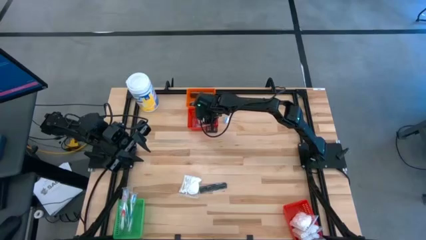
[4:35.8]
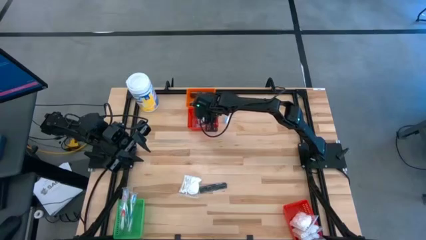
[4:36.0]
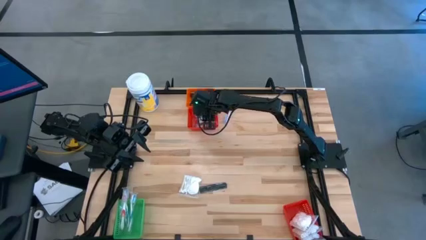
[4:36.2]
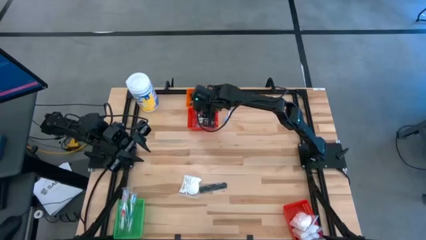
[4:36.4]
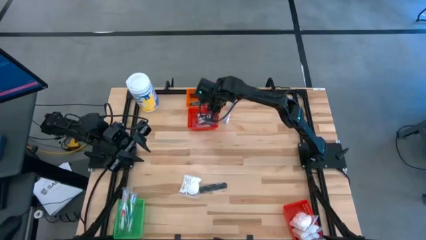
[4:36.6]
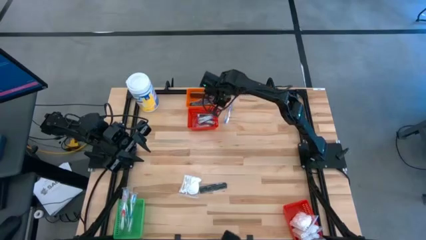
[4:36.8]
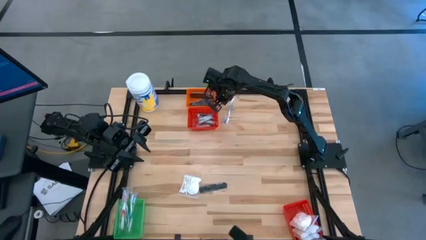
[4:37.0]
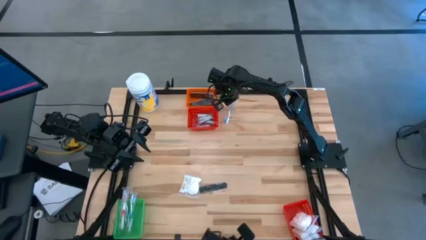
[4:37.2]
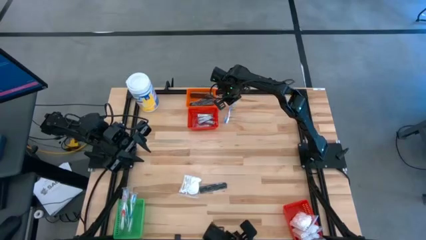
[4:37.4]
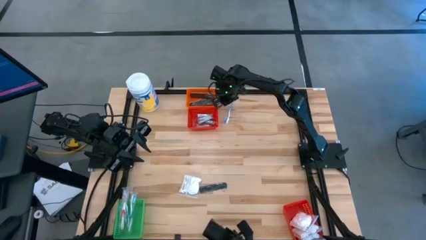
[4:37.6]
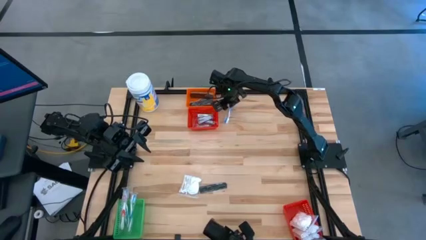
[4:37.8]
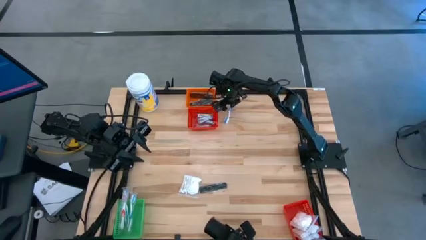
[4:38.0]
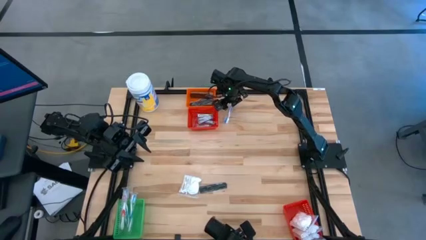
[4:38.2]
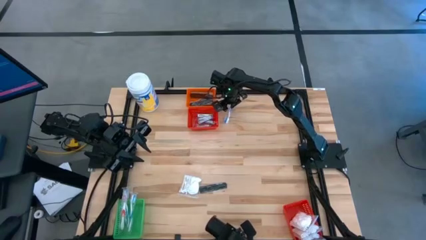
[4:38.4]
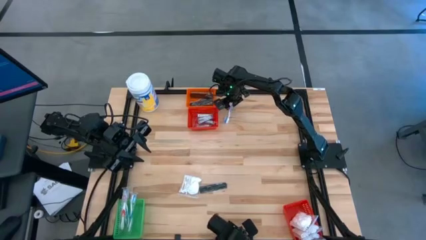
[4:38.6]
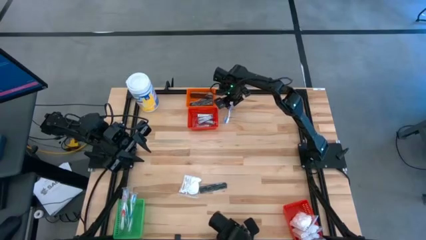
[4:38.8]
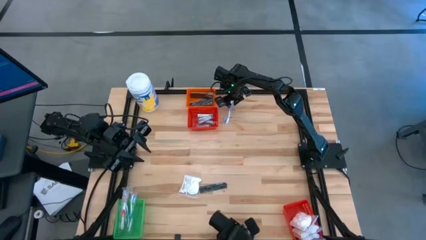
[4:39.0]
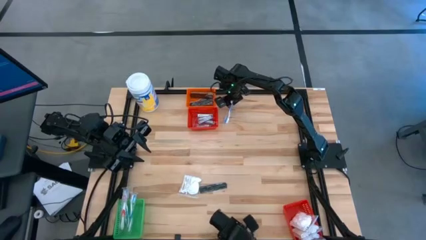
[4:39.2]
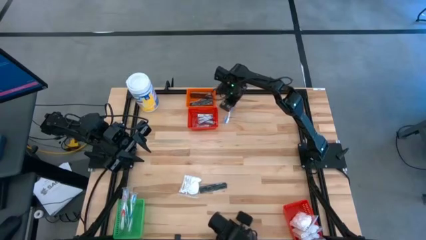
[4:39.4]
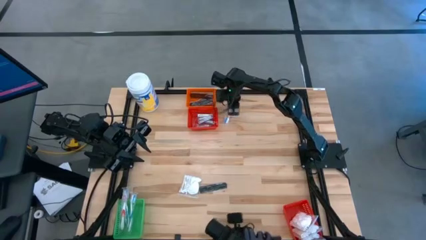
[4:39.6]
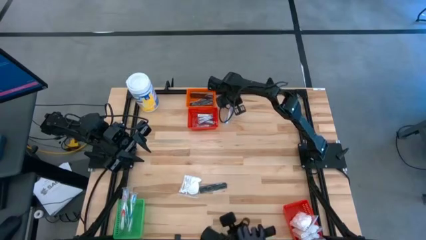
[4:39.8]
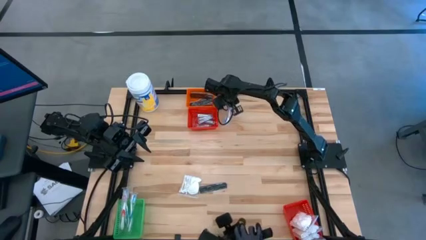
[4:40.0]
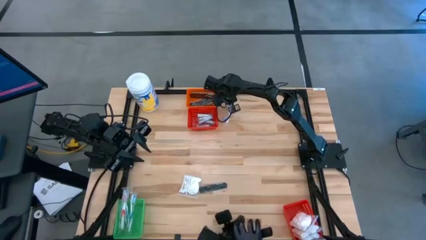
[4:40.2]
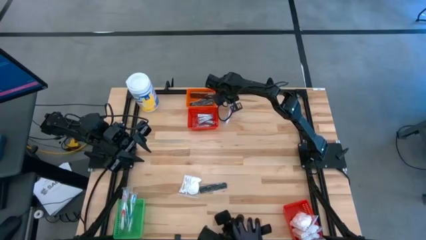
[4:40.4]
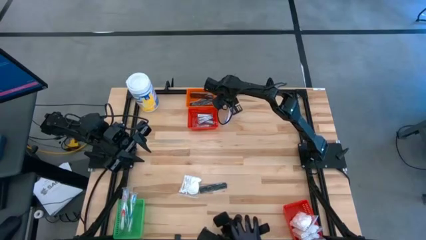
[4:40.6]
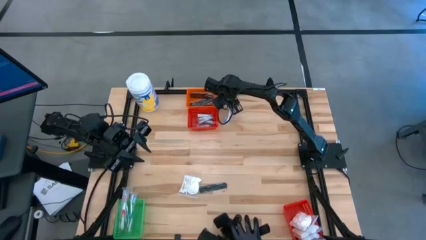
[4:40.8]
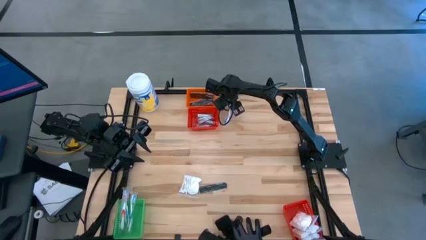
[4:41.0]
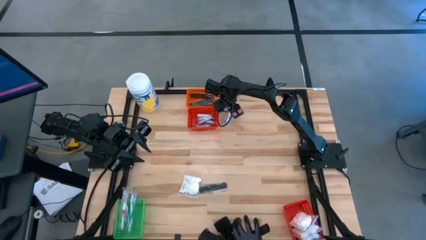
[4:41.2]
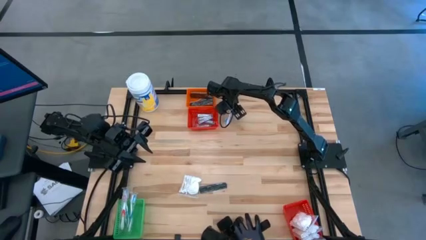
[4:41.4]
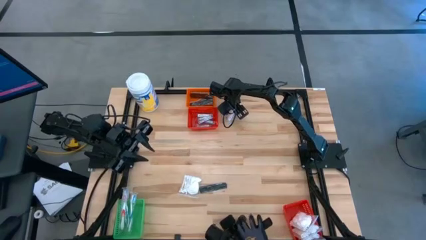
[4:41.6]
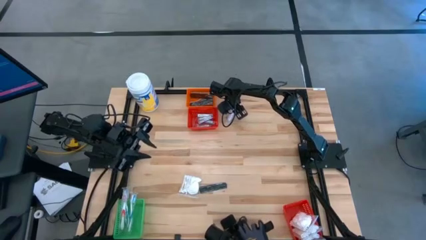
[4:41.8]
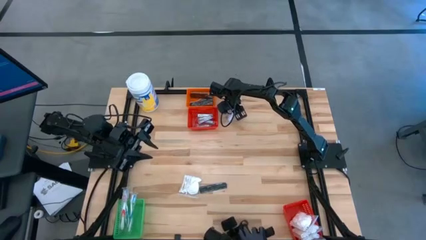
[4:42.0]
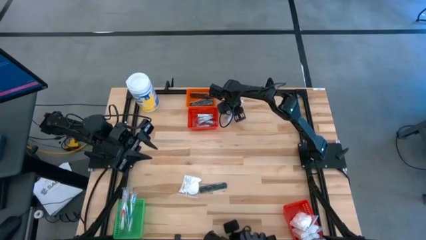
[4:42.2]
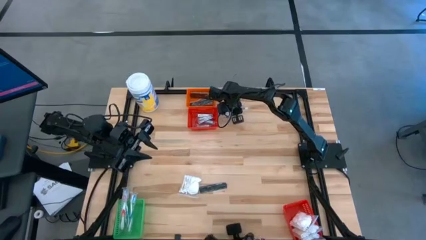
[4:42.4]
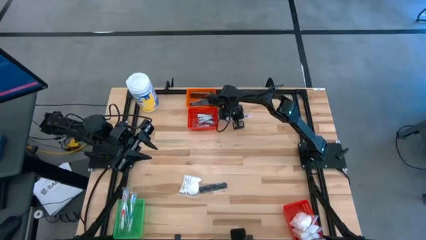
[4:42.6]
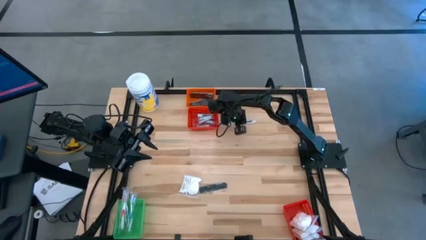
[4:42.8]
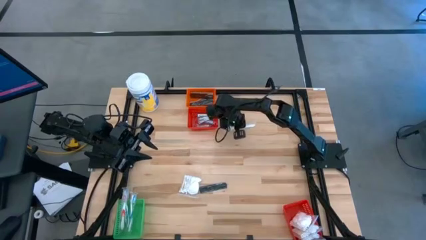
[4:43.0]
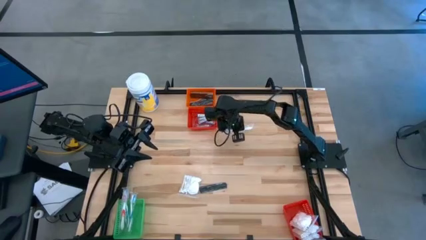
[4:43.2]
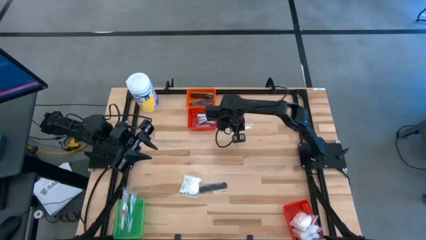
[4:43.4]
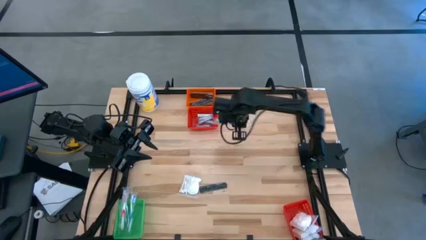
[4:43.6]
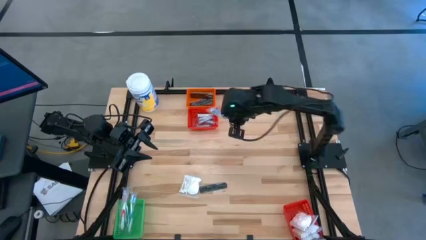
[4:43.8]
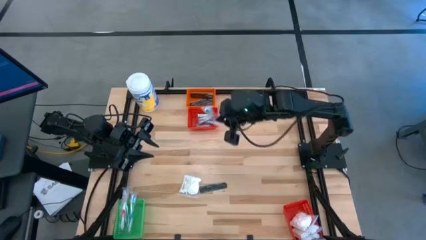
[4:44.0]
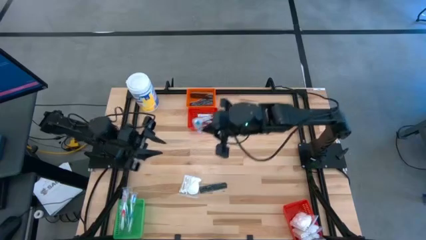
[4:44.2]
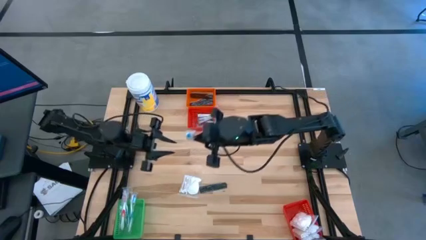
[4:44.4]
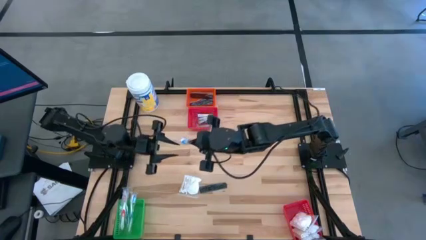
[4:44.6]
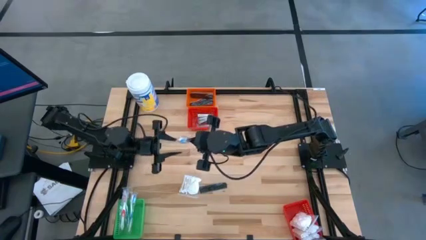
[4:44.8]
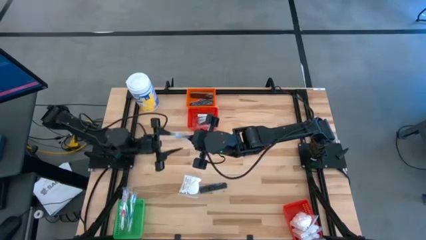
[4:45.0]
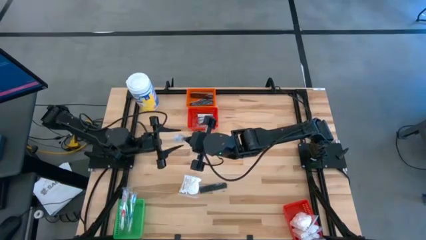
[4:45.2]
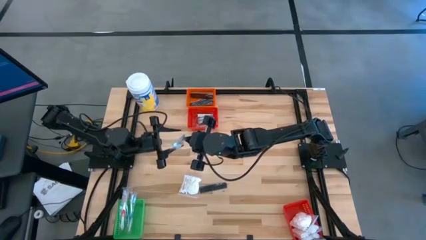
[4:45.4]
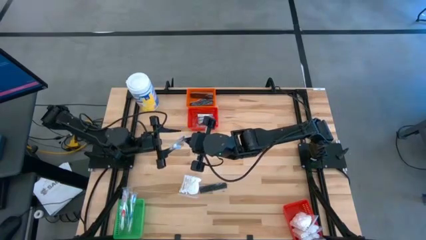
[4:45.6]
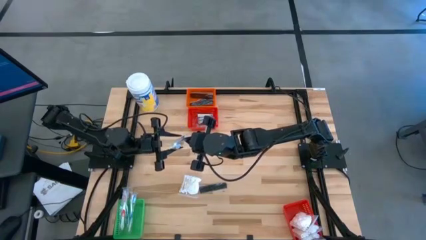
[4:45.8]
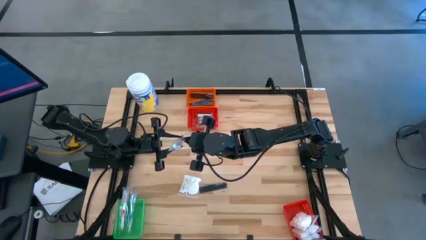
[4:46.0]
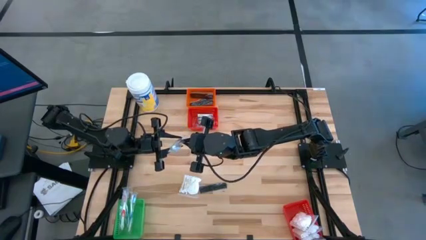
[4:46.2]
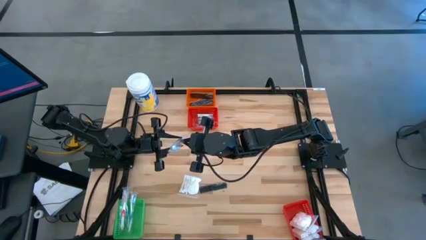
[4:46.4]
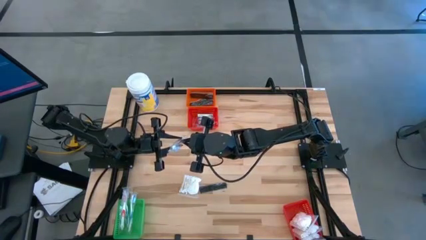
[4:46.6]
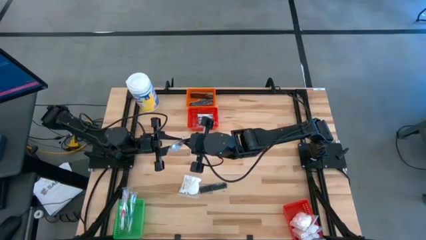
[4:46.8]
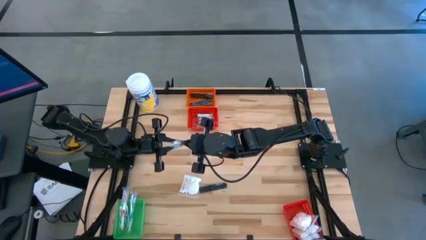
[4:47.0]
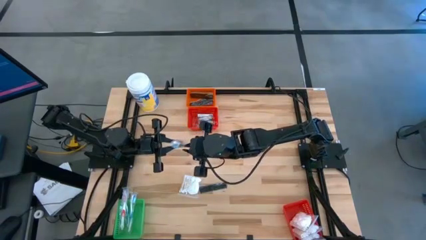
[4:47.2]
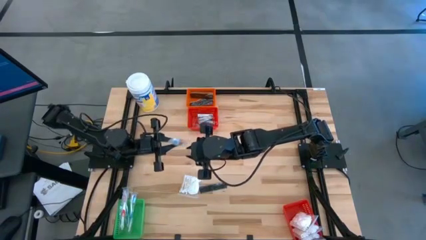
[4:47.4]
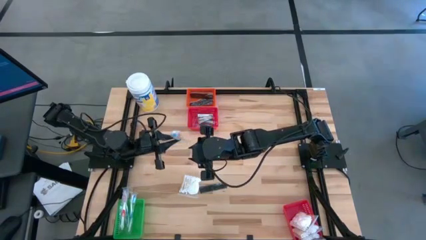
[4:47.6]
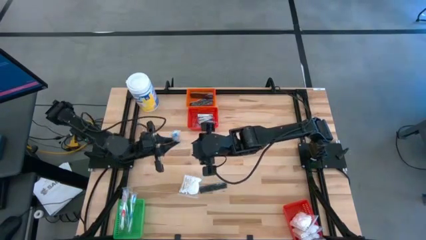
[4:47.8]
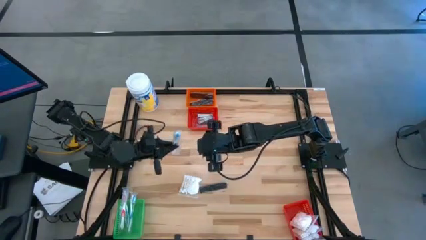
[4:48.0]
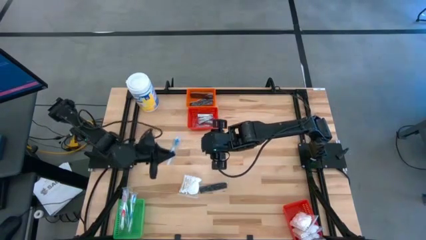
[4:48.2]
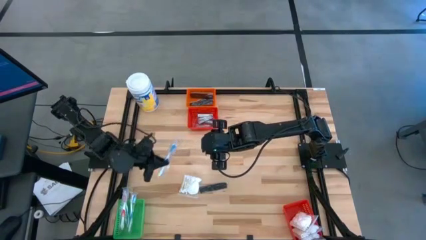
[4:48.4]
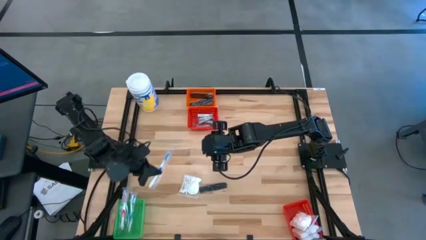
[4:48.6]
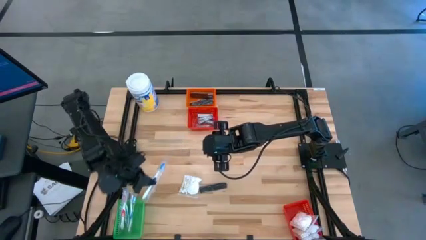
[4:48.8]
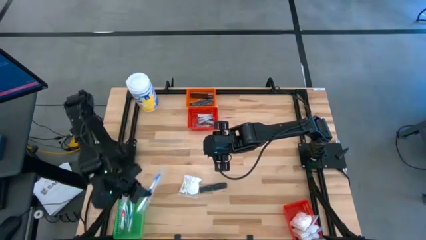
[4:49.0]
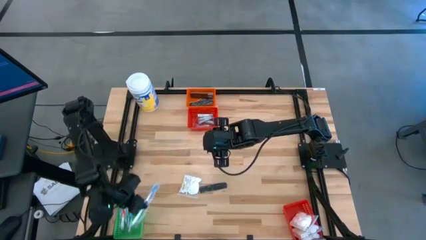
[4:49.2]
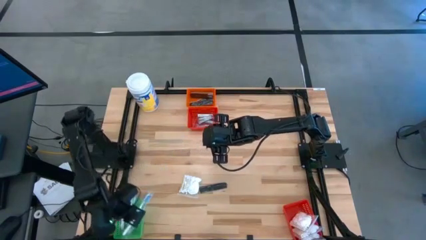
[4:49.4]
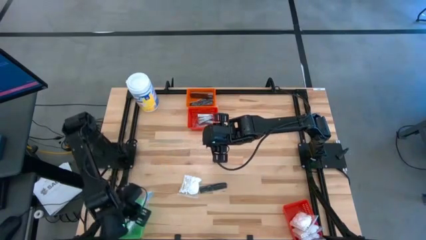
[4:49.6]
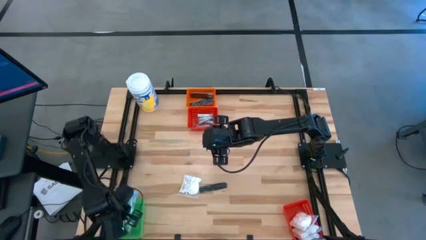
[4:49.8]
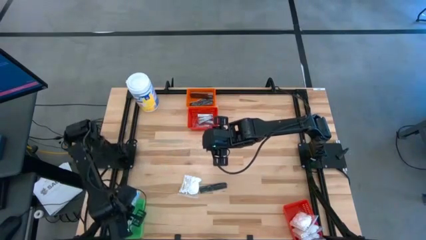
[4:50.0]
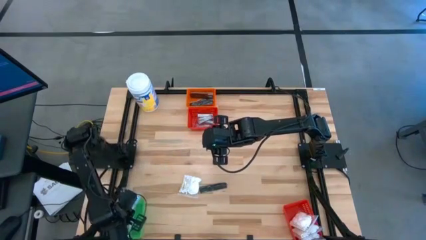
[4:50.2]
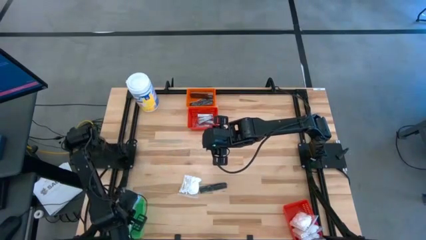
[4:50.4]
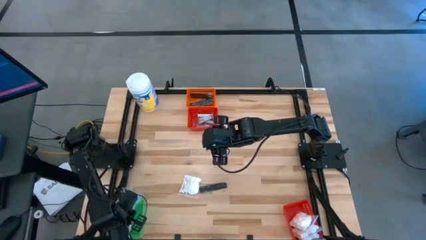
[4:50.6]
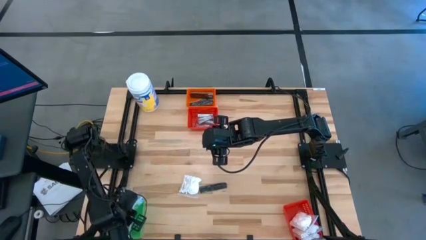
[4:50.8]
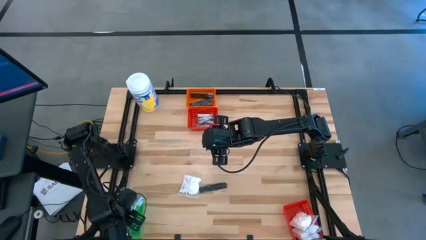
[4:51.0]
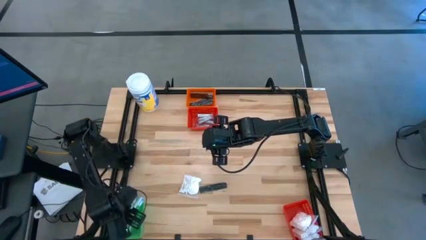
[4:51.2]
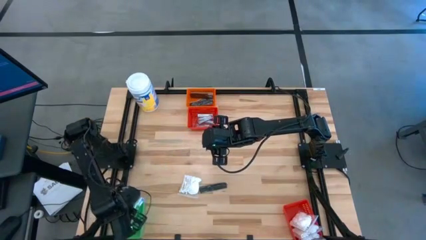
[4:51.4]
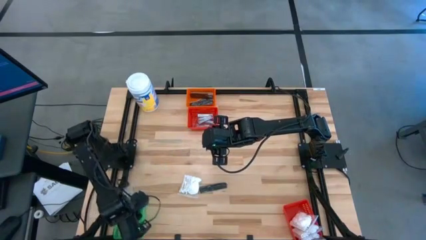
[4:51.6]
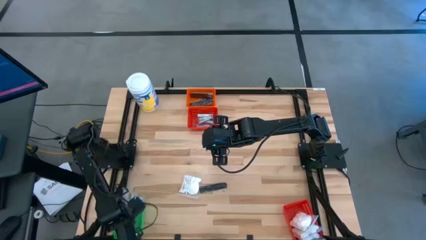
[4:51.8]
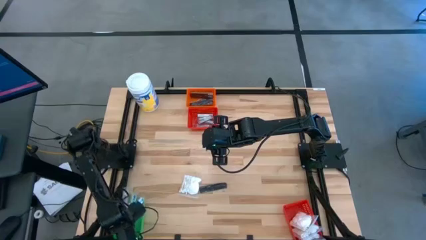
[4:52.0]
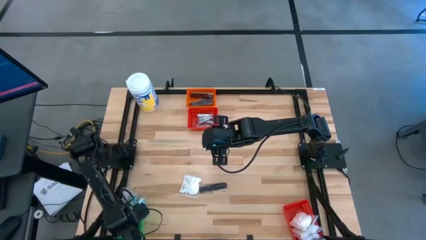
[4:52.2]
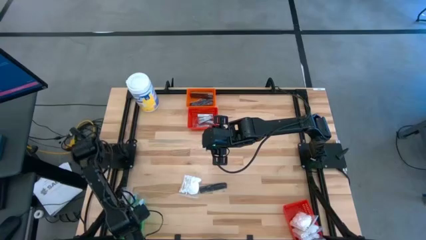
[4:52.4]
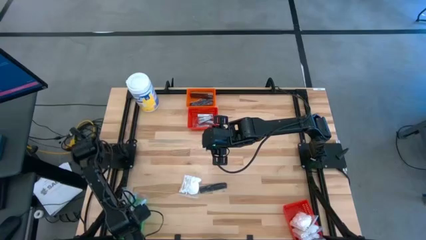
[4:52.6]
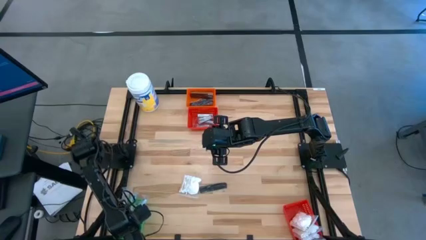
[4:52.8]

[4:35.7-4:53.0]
Task: Pick & Place Travel size toiletries
Put the blue toothbrush into the green basket
